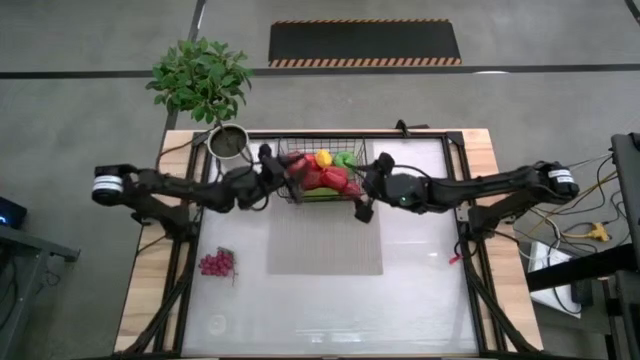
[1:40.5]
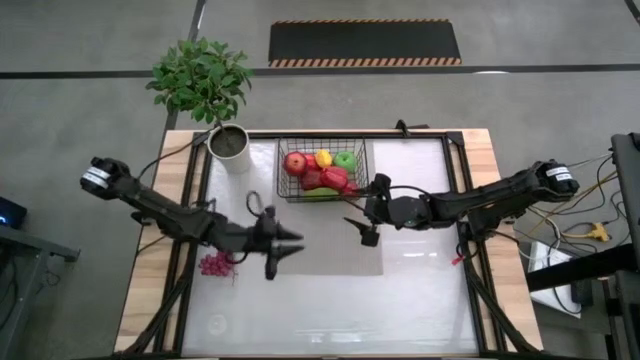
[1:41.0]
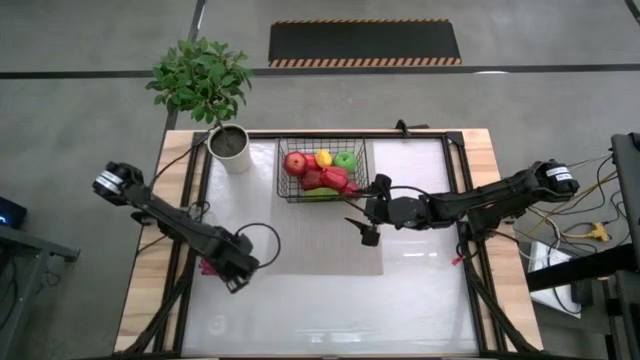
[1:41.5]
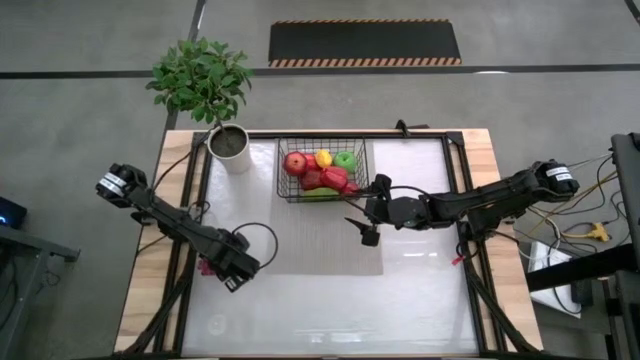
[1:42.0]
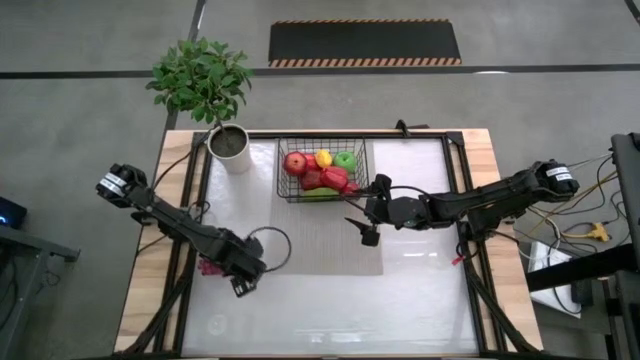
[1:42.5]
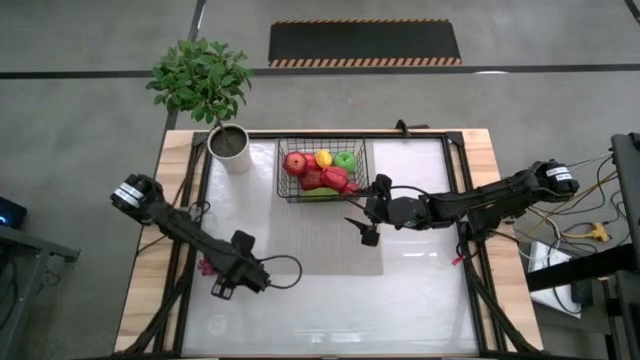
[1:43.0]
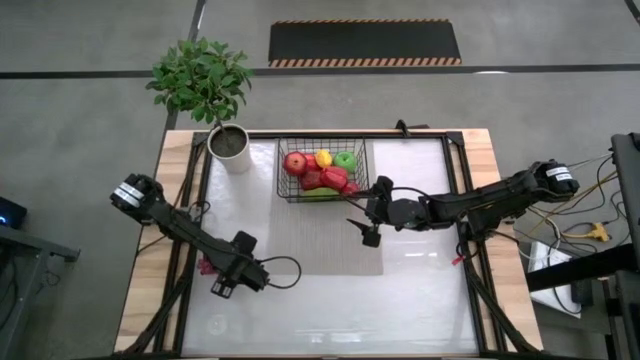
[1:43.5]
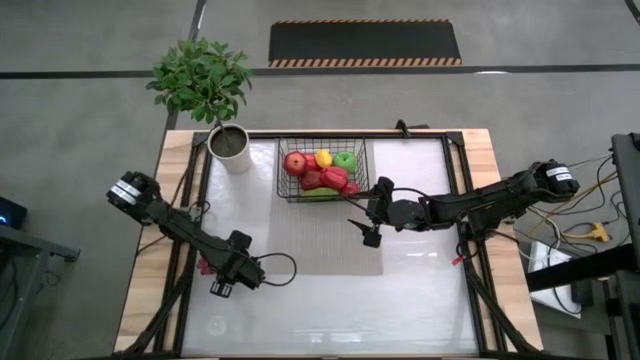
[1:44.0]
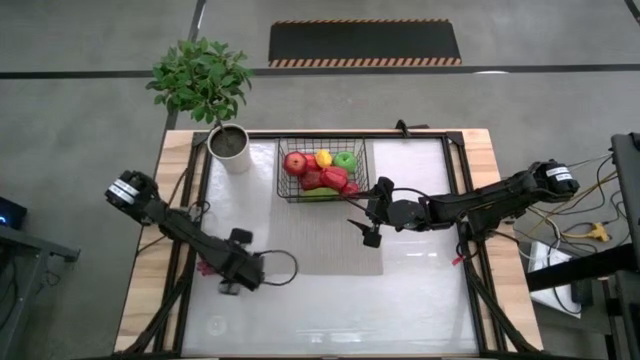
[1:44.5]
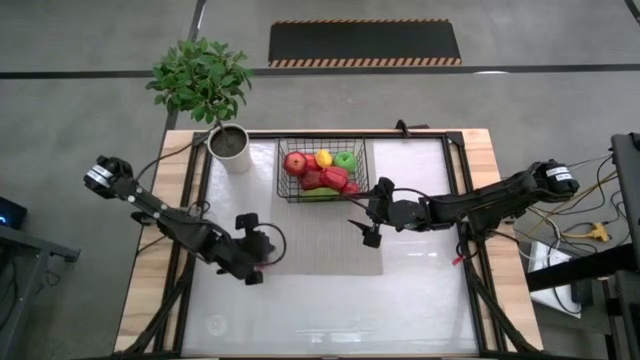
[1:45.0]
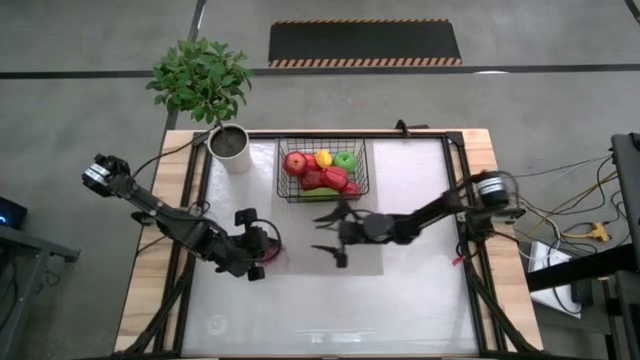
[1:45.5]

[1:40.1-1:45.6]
Task: Build produce basket
Put the grapes into the wire basket

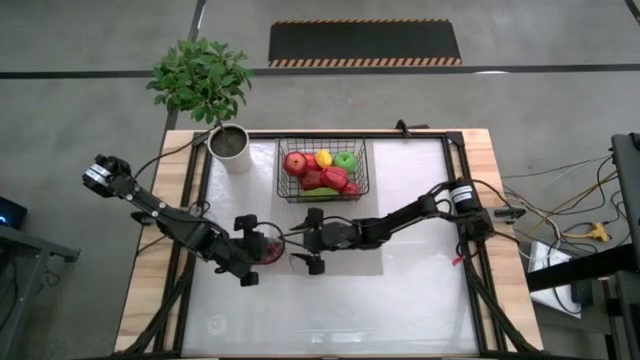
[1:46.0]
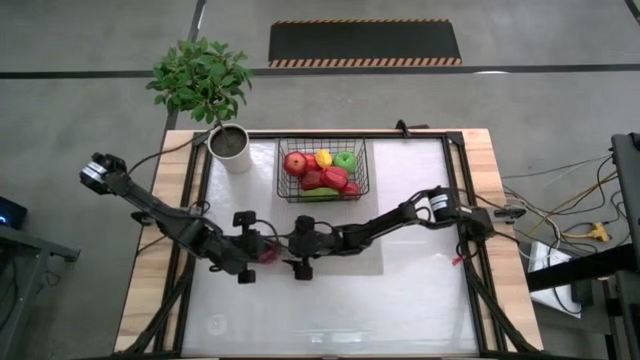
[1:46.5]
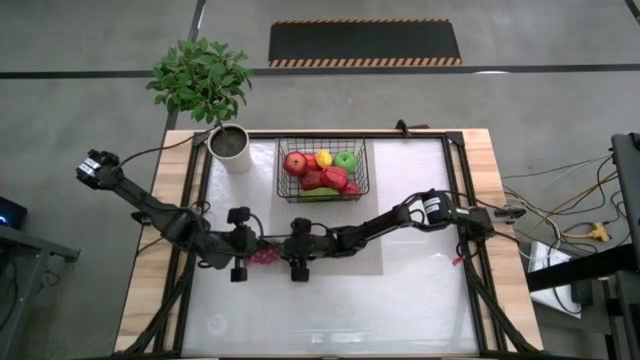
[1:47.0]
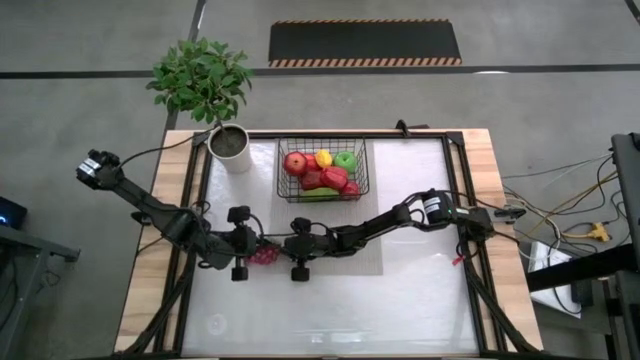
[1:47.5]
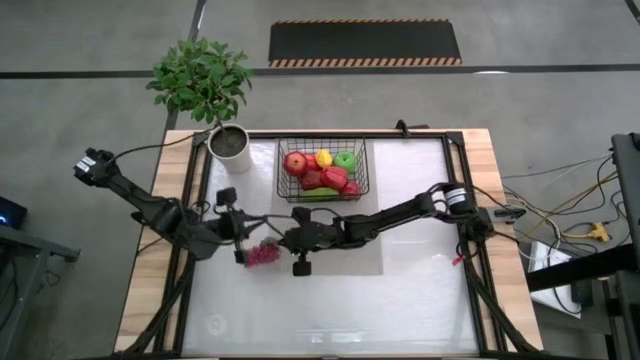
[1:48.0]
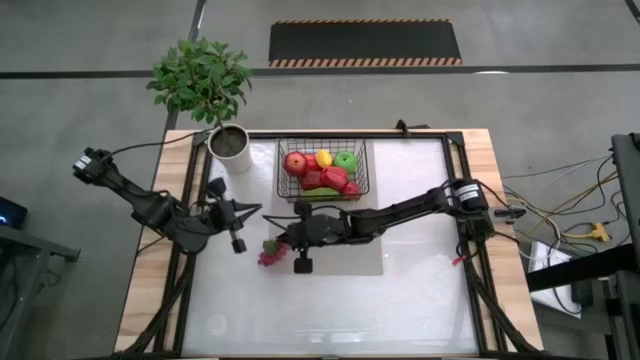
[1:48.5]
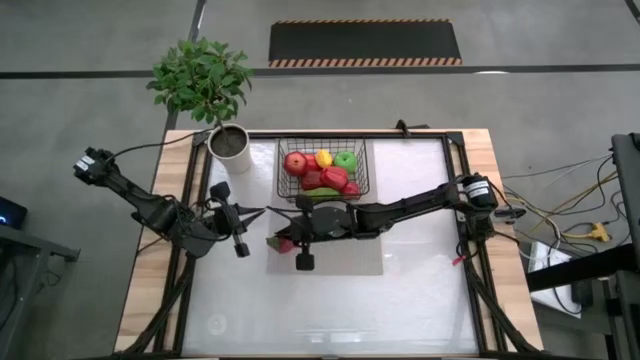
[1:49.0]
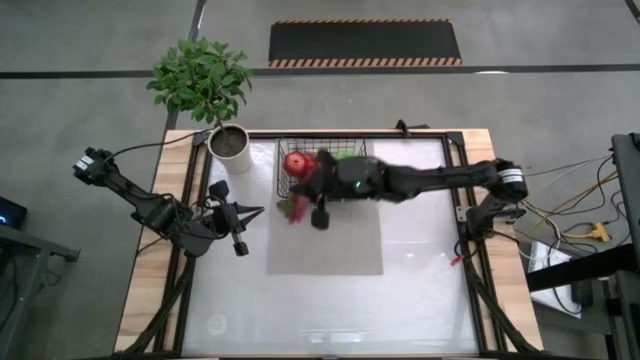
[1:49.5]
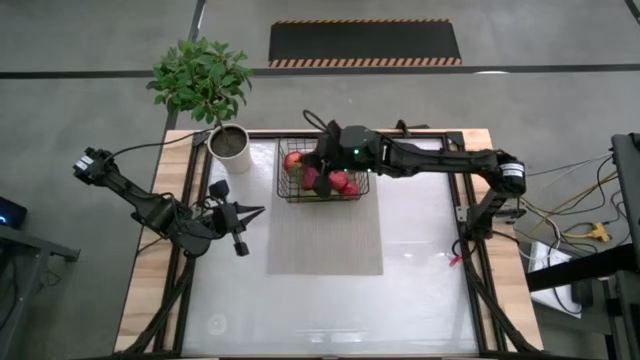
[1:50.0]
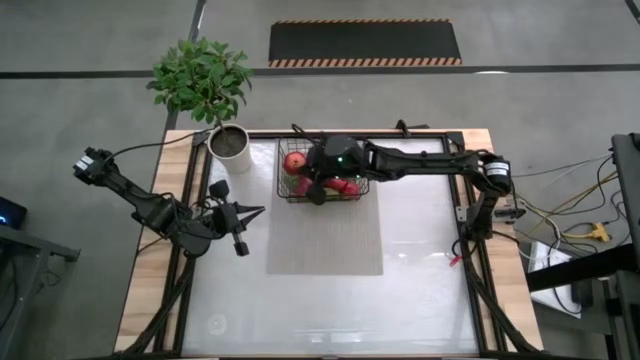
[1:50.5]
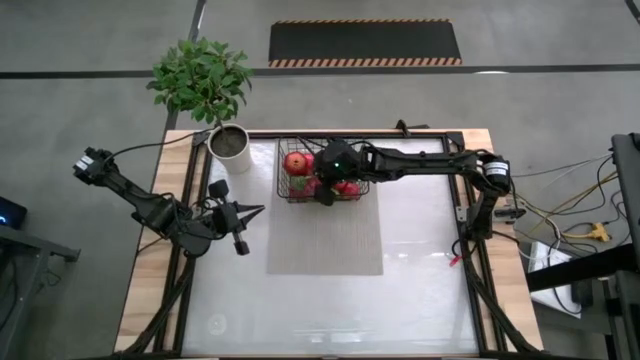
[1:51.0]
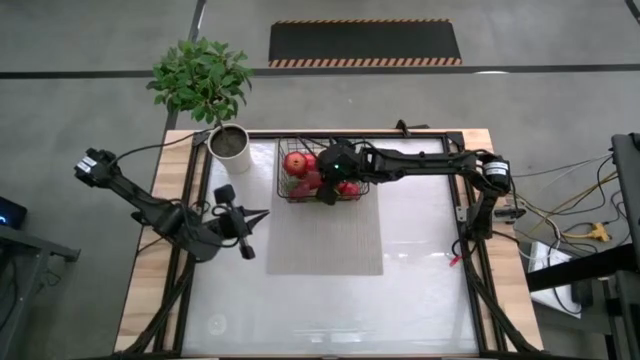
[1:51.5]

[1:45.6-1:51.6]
Put the grapes into the wire basket

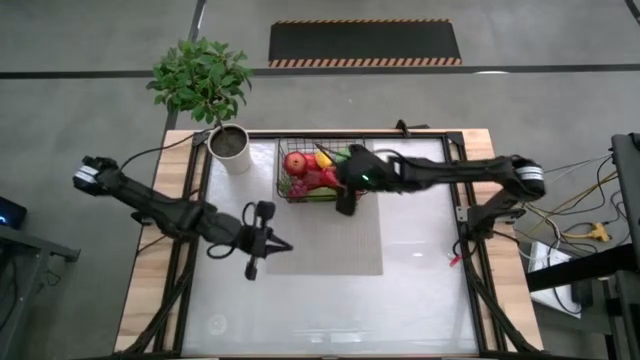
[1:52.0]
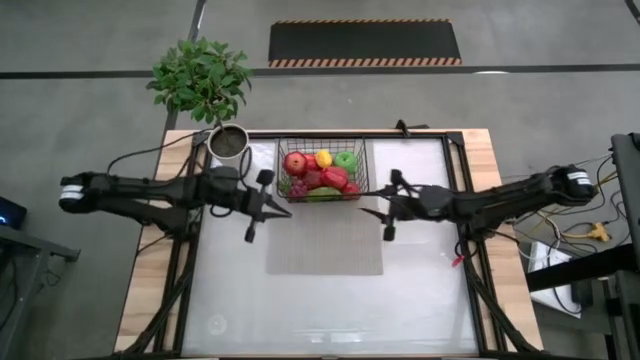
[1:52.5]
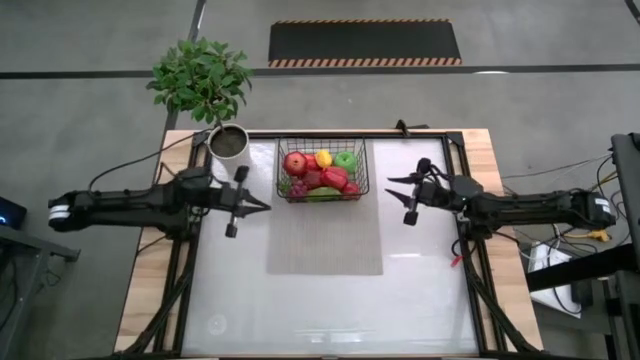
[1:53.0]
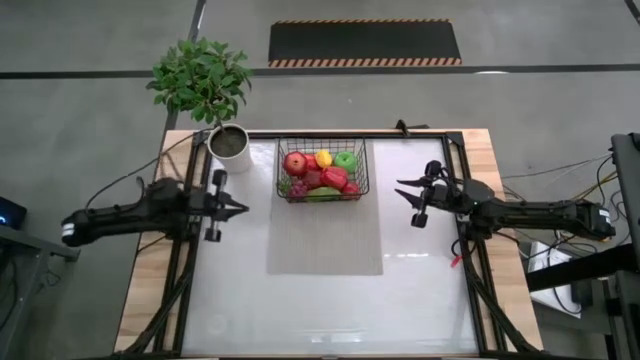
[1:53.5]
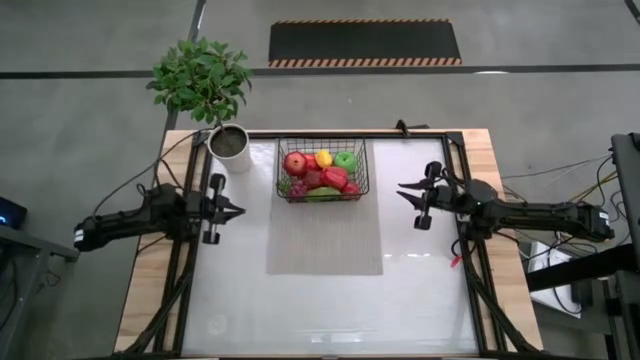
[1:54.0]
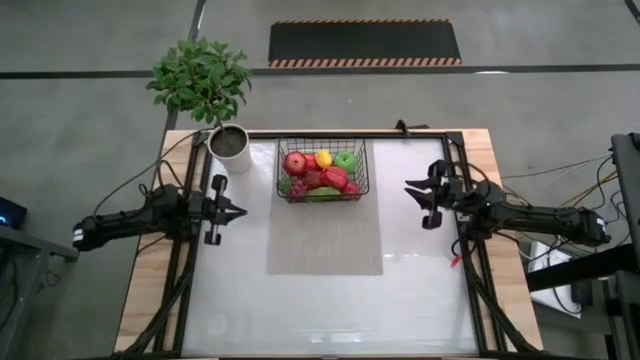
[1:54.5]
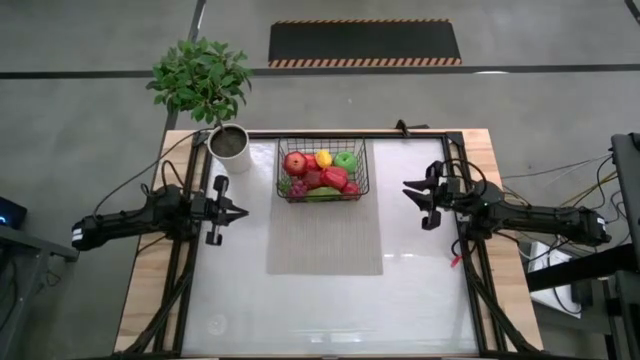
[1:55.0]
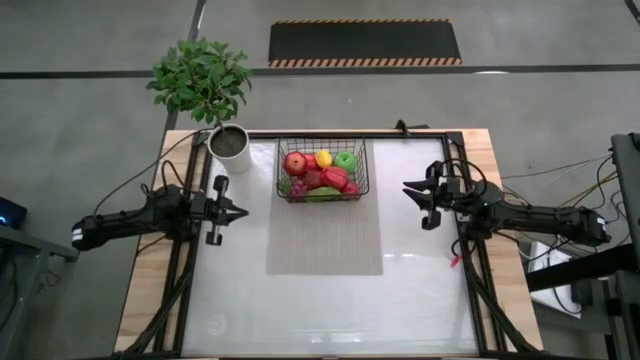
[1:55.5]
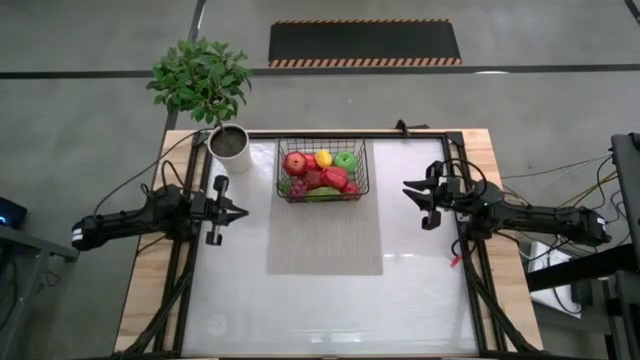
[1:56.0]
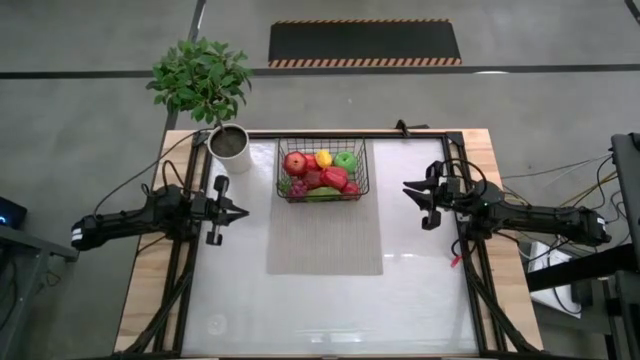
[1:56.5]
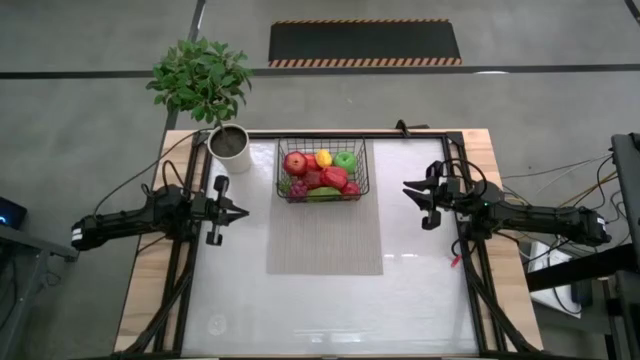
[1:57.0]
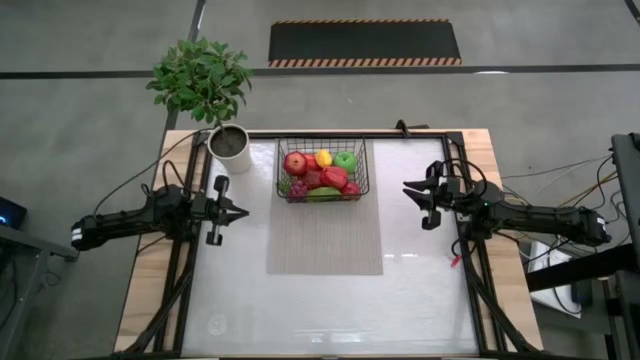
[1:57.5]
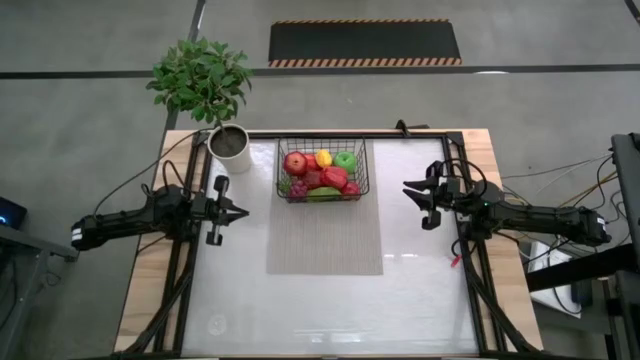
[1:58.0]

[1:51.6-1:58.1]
Return to Home Position

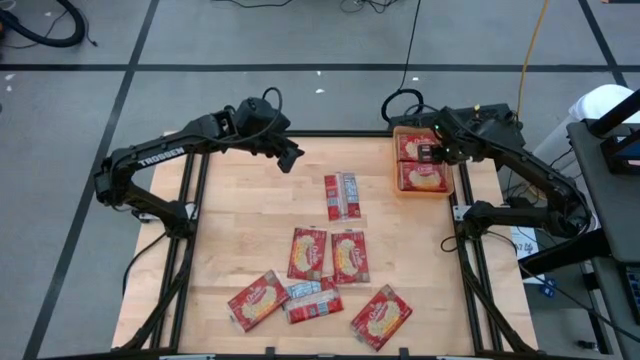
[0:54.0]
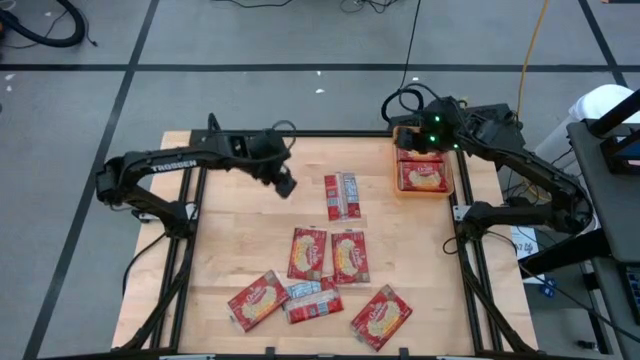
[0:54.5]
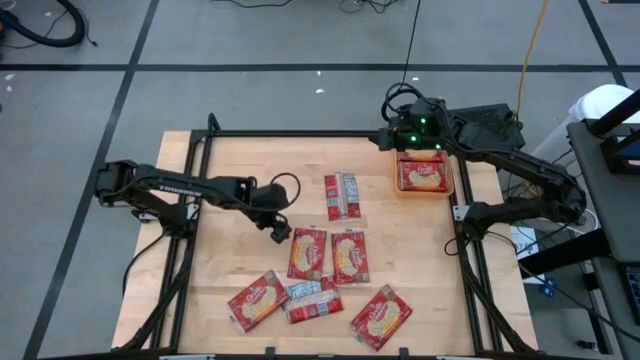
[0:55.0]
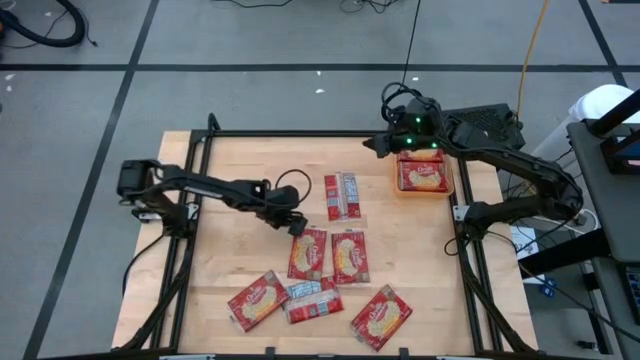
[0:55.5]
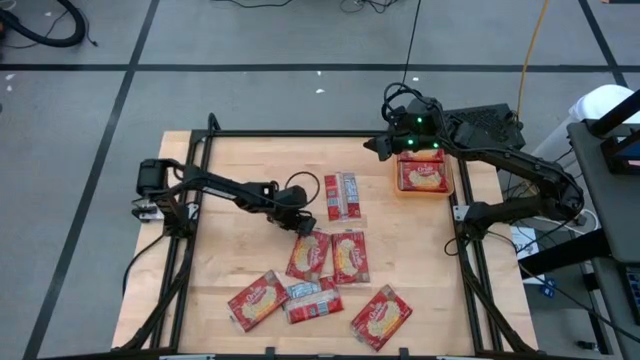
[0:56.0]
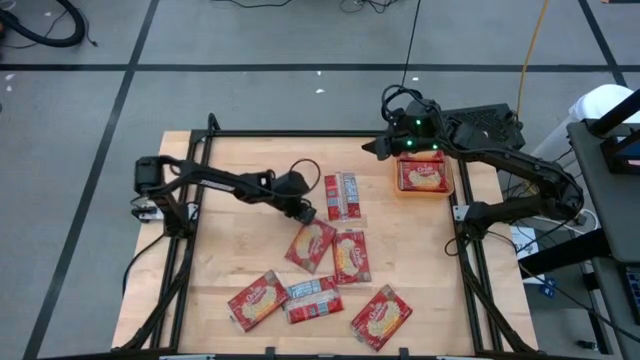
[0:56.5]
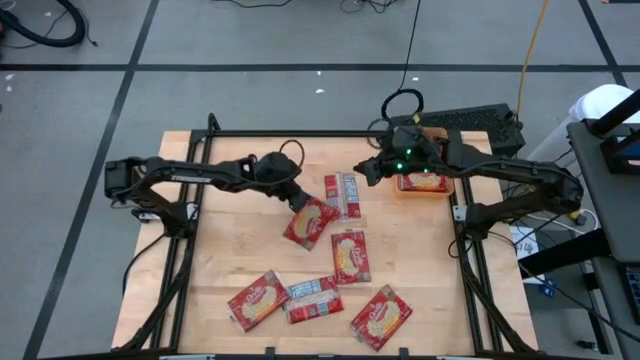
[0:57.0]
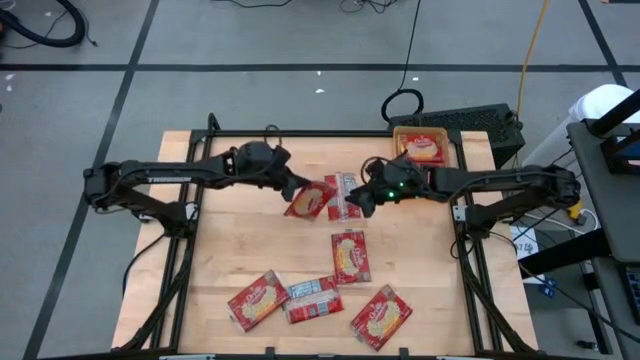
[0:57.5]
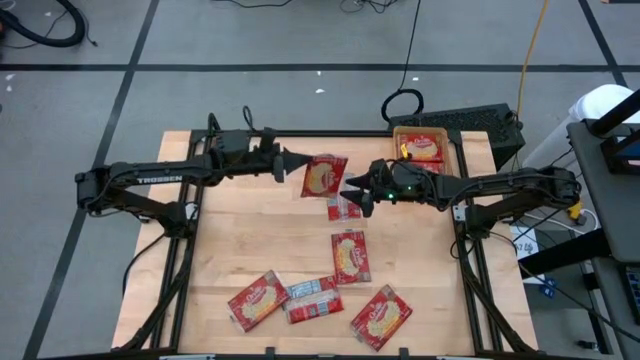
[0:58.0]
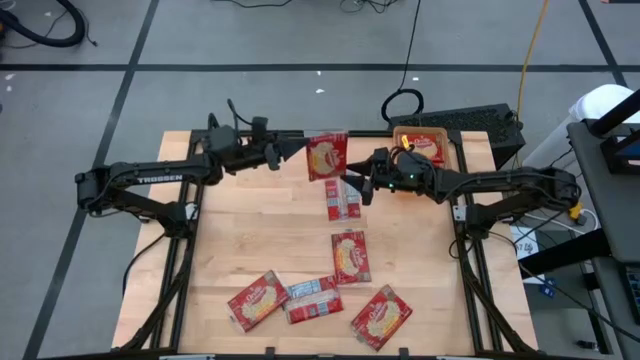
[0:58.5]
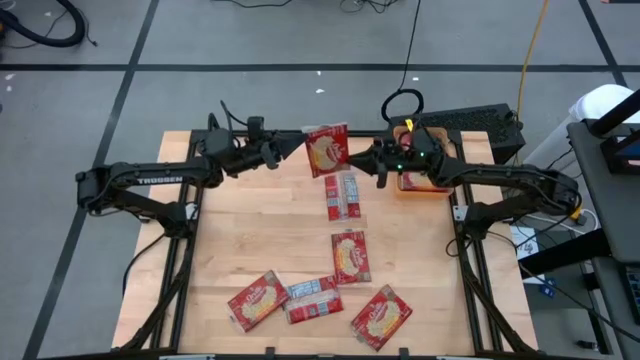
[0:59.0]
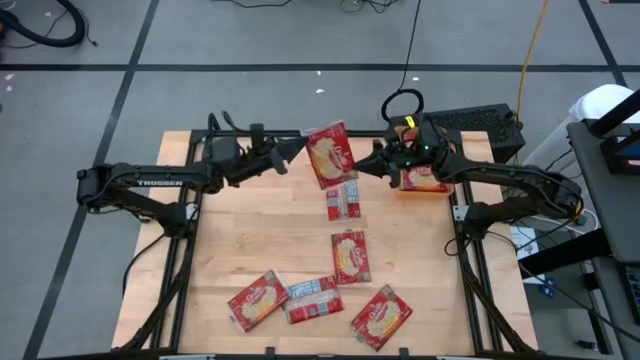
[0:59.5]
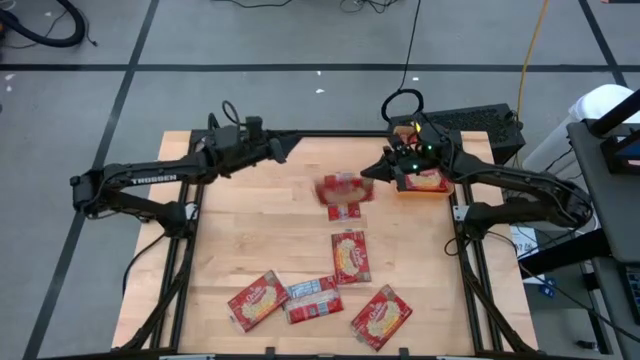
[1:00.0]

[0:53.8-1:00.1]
Task: Sort popcorn bags into baskets
Put the red popcorn bag into the orange bin
